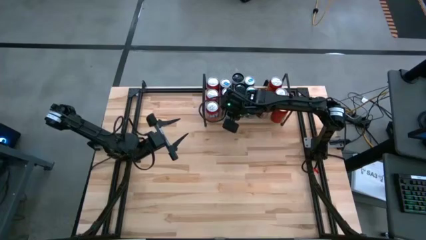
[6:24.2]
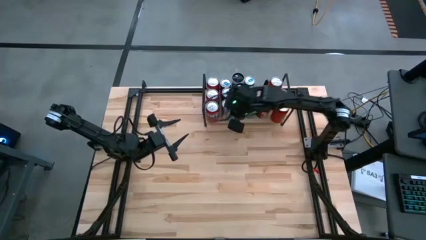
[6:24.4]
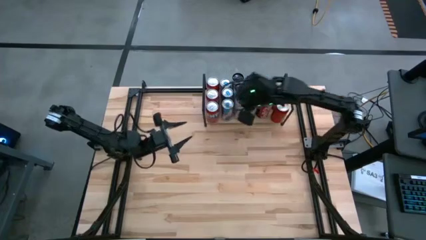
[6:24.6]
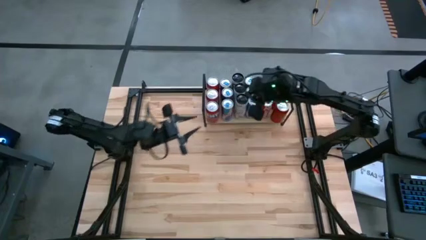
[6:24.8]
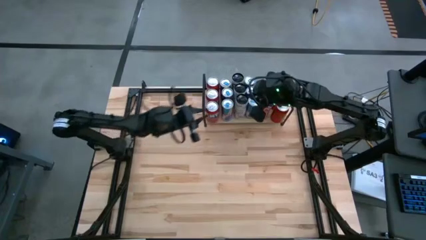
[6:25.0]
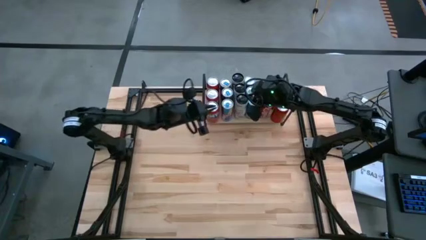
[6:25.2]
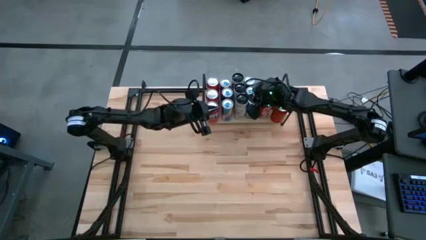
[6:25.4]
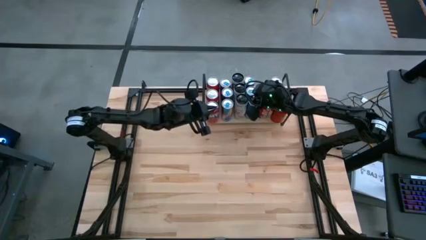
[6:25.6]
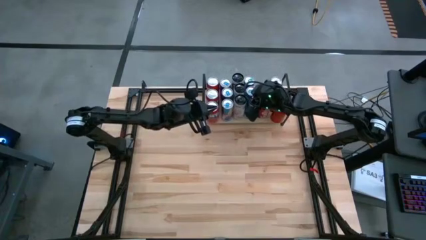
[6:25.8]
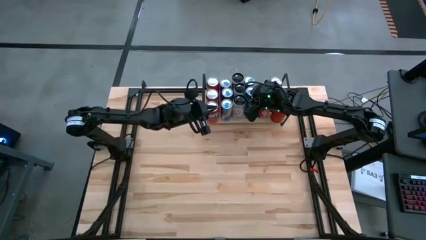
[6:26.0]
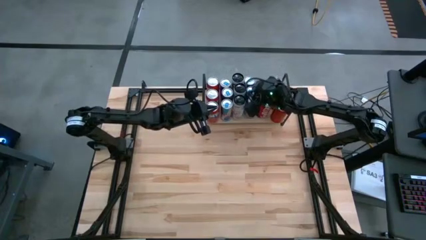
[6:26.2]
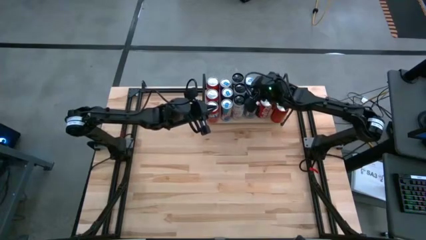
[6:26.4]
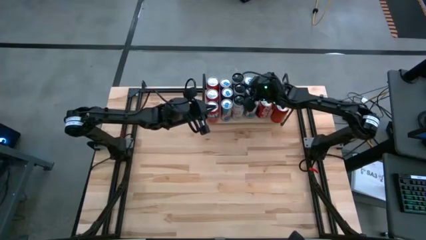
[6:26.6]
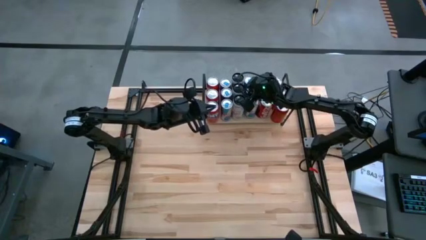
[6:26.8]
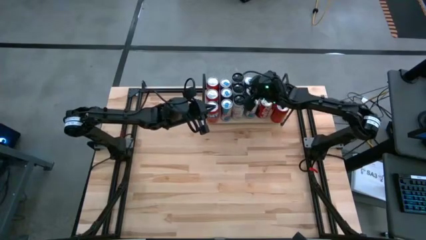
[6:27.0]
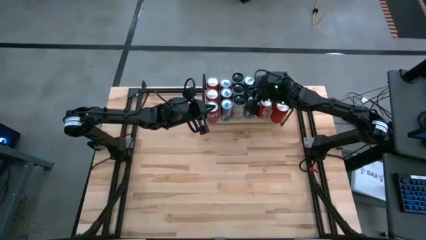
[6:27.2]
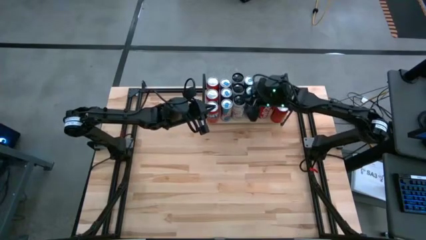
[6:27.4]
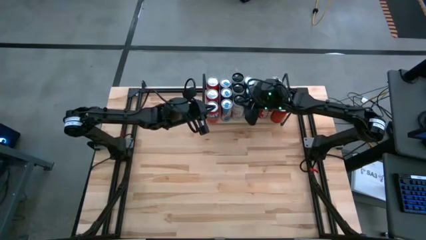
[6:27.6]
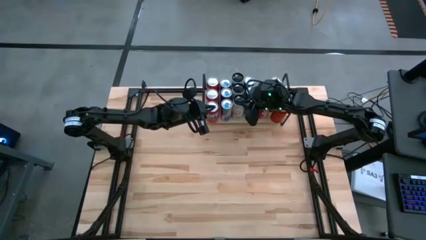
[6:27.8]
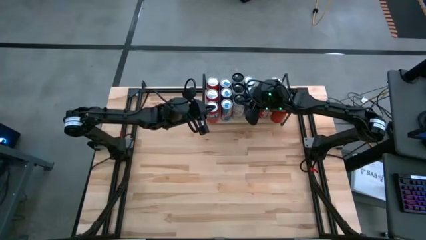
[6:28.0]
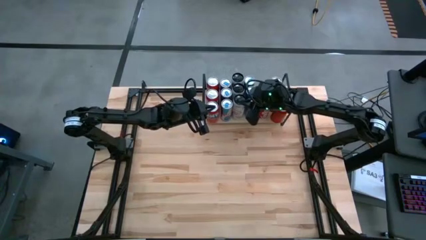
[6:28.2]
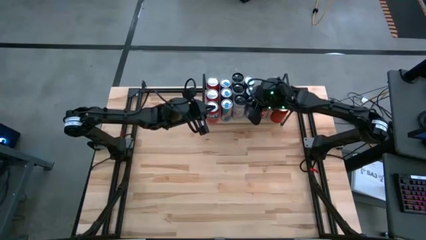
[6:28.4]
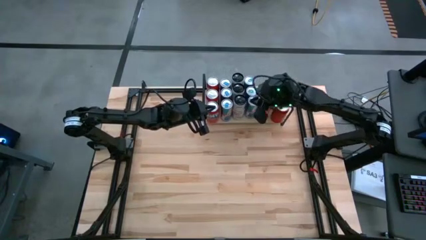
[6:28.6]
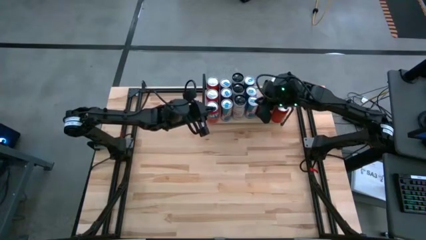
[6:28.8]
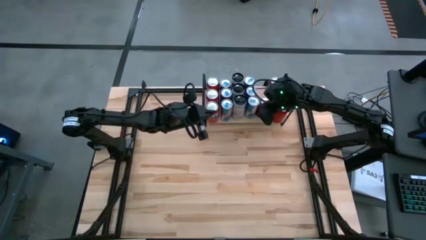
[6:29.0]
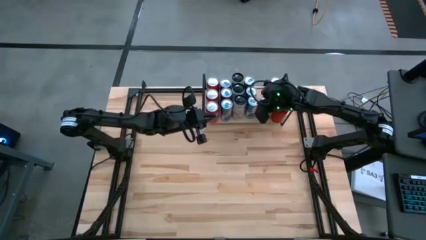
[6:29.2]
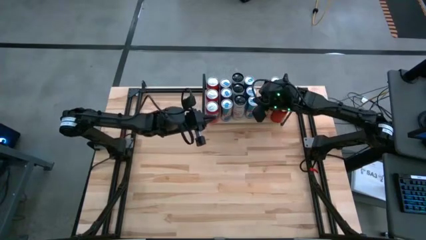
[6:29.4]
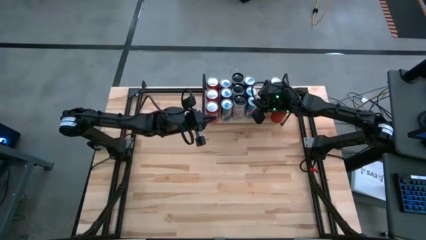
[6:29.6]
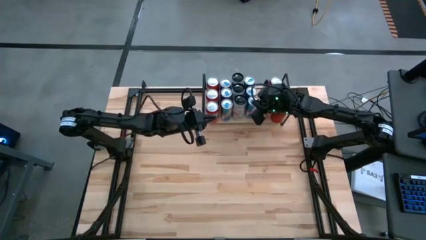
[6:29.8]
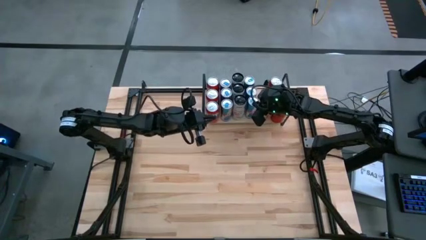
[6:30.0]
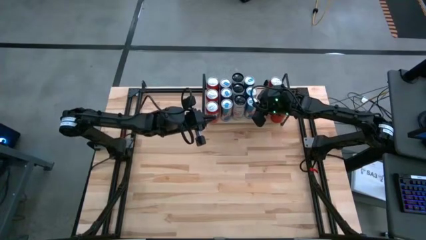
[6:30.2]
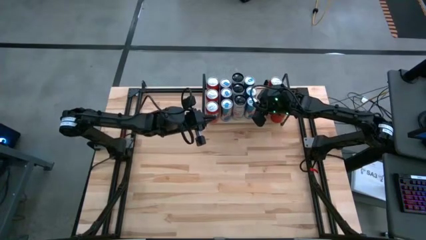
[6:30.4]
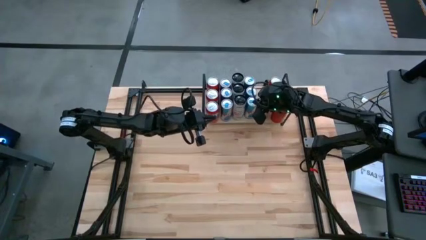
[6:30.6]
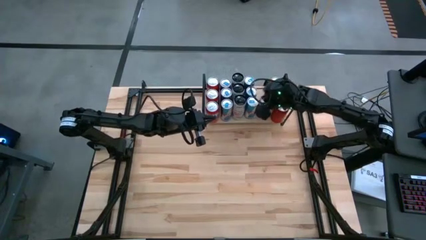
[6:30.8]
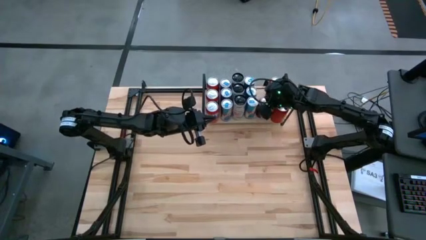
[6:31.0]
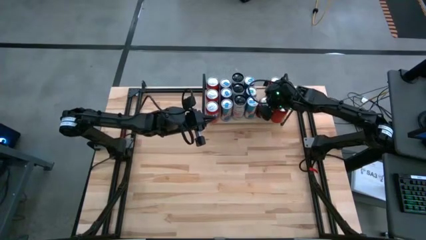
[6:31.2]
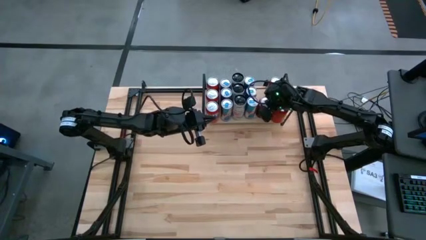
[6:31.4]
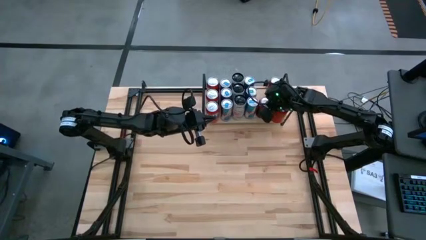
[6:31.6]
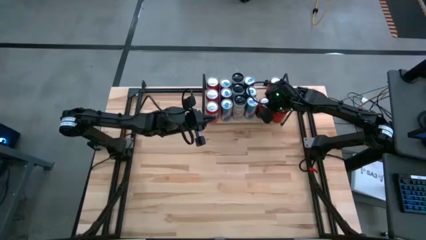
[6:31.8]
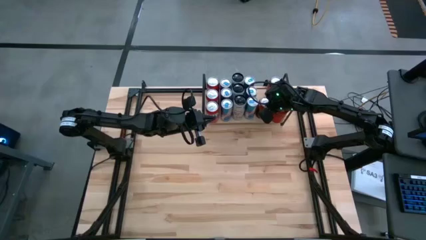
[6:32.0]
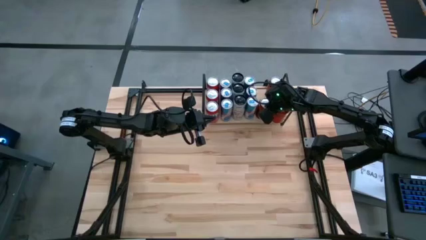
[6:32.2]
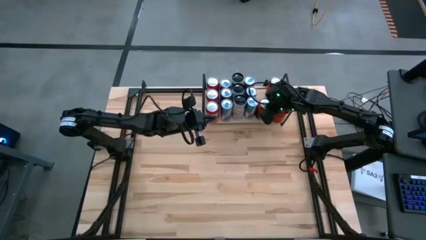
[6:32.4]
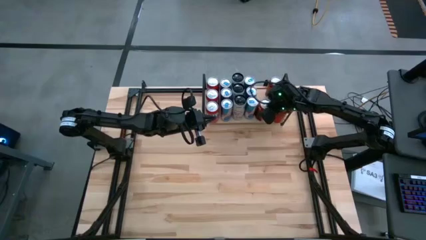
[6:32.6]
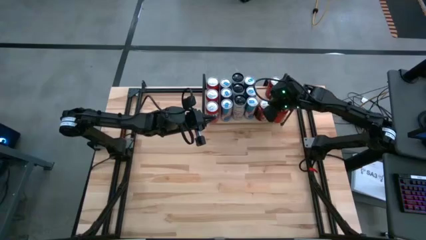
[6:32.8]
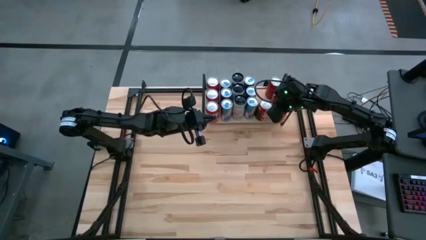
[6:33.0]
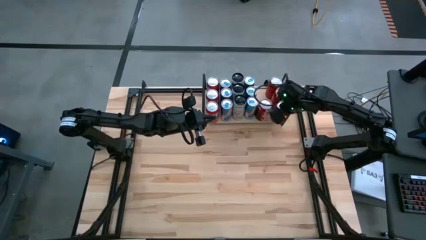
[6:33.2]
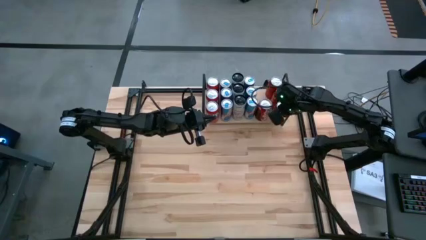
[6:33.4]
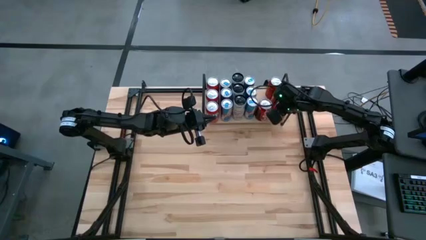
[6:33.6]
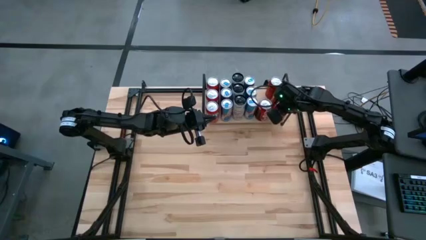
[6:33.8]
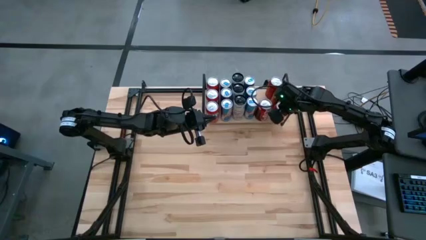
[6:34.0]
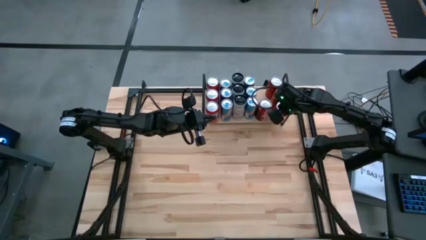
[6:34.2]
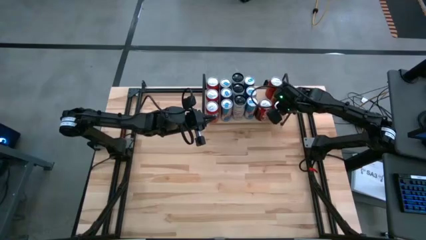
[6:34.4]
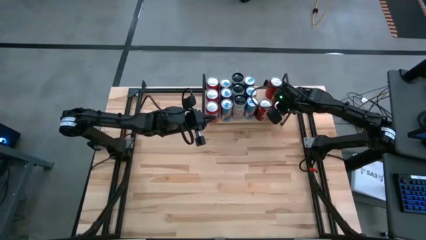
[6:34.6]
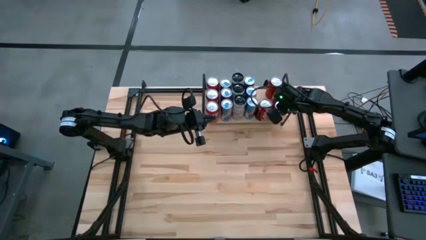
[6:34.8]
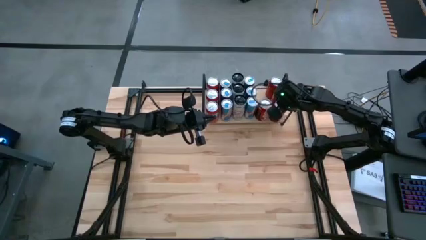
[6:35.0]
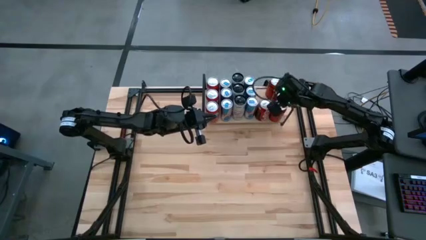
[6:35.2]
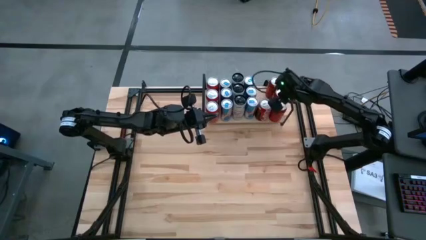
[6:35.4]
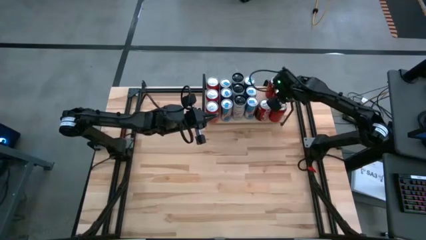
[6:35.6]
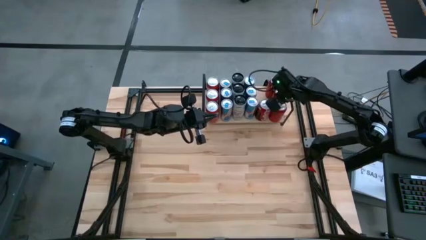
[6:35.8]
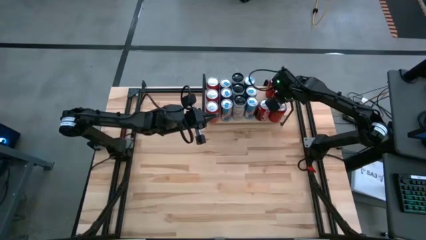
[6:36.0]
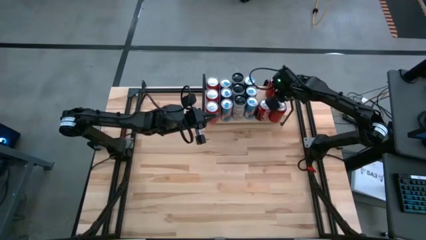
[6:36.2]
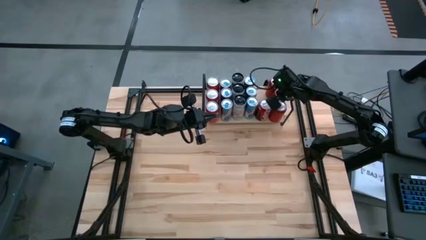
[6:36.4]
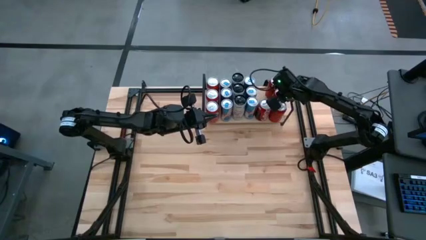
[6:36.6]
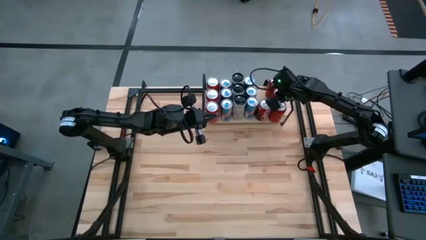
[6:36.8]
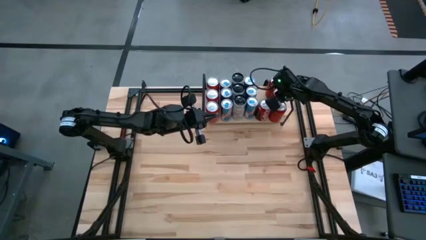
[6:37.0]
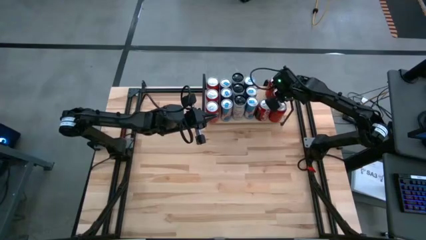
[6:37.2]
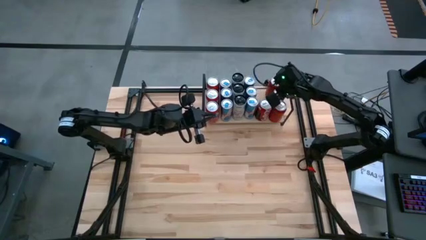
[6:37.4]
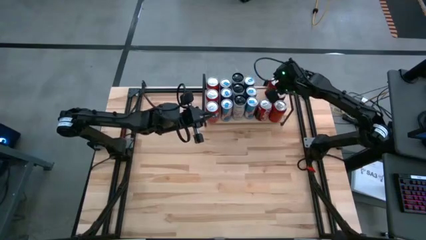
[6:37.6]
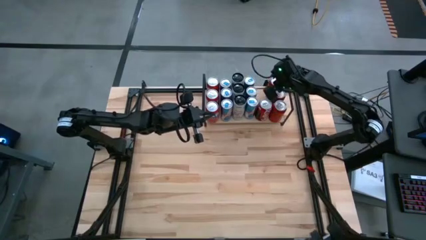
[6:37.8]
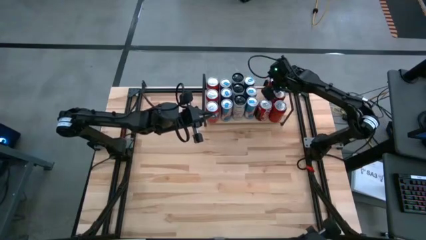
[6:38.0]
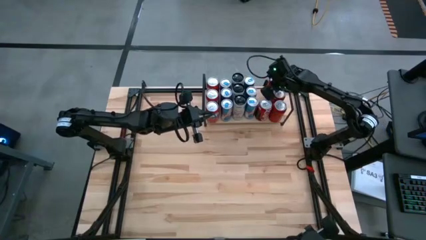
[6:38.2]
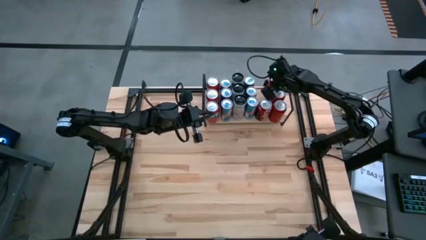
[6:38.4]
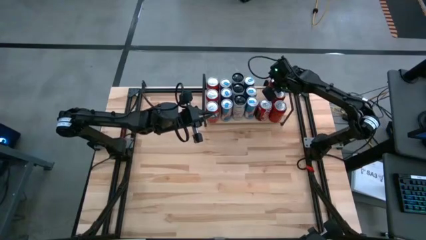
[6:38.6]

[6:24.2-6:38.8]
Task: Place canned beverage on shelf
Adjust the soda cans on the shelf
